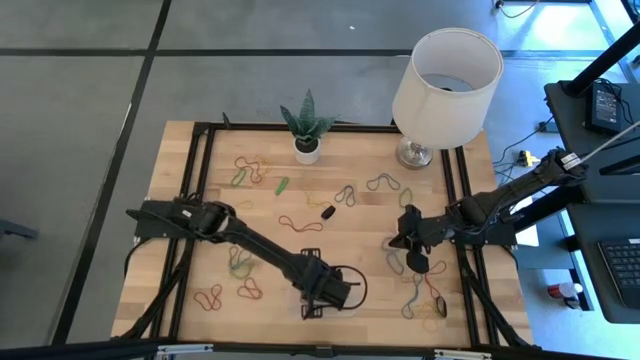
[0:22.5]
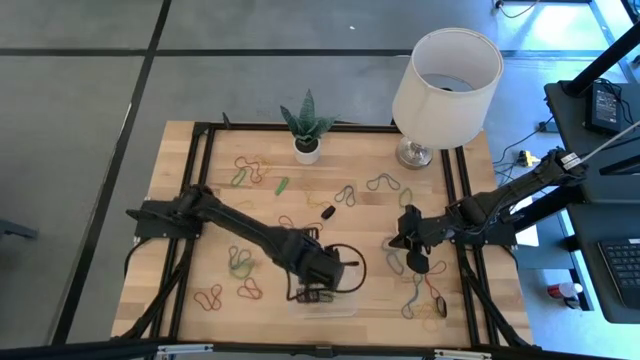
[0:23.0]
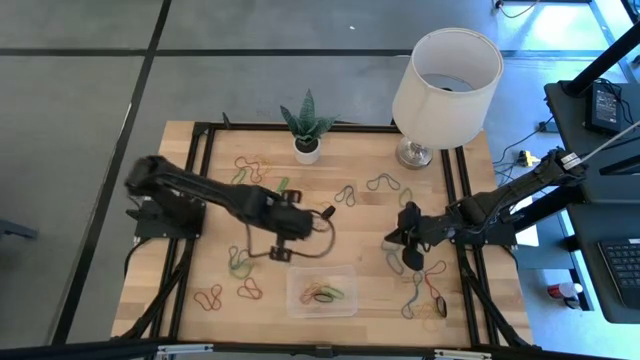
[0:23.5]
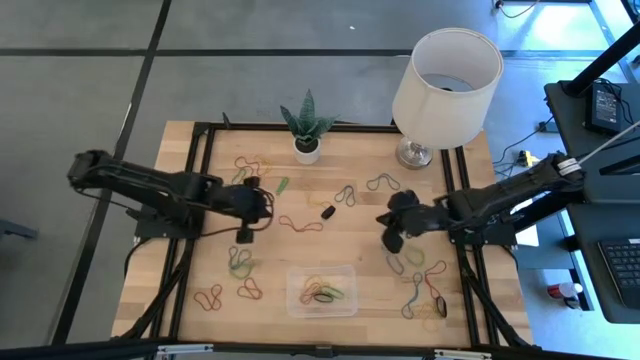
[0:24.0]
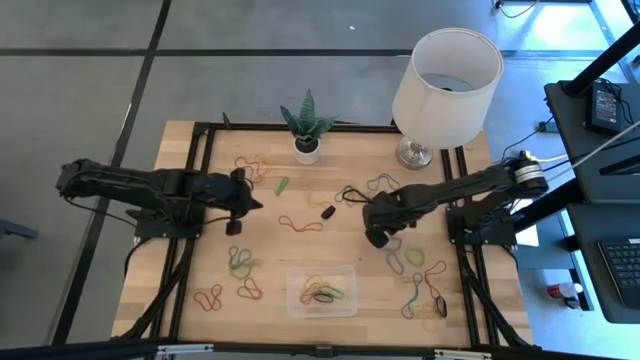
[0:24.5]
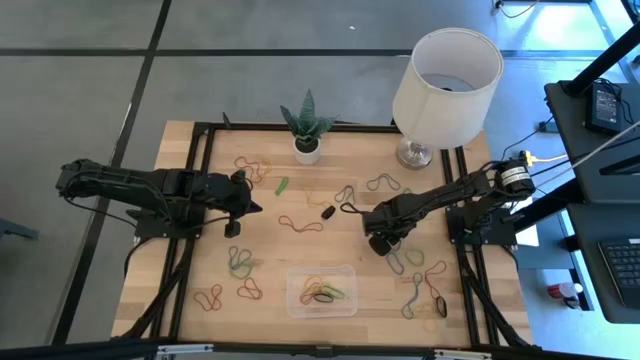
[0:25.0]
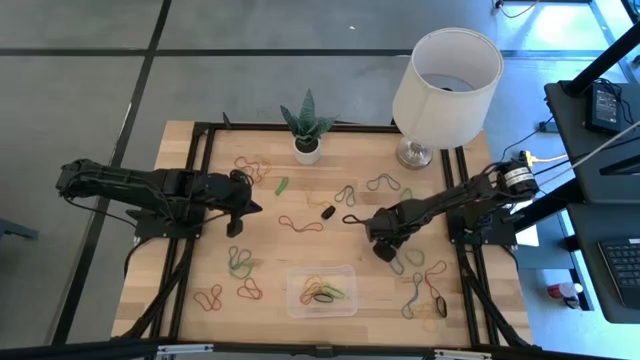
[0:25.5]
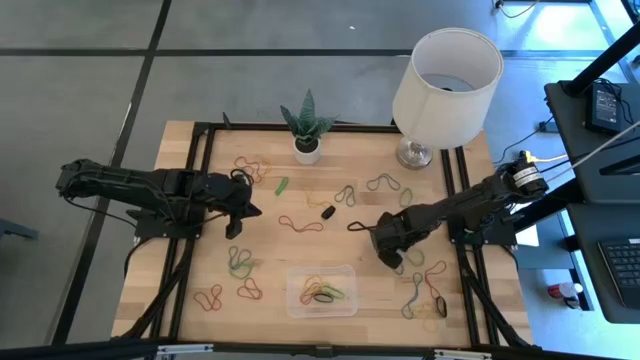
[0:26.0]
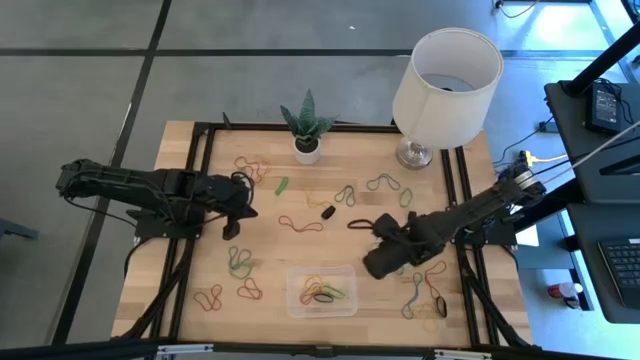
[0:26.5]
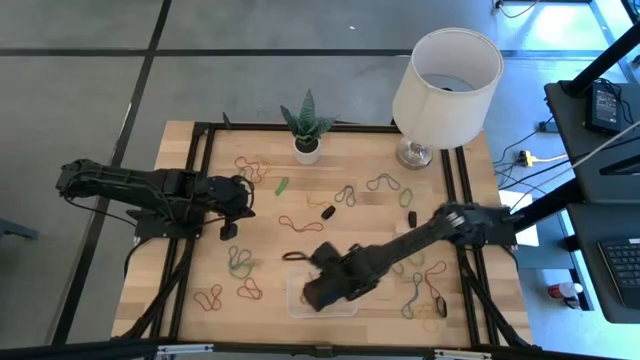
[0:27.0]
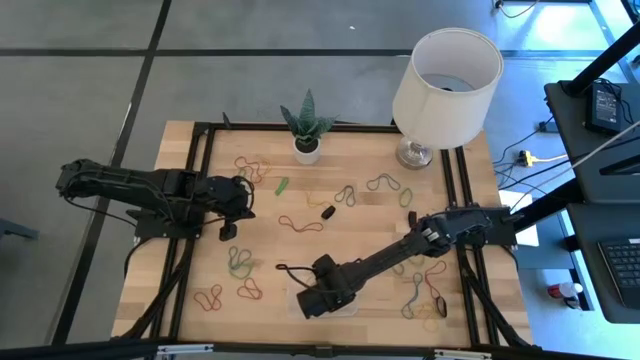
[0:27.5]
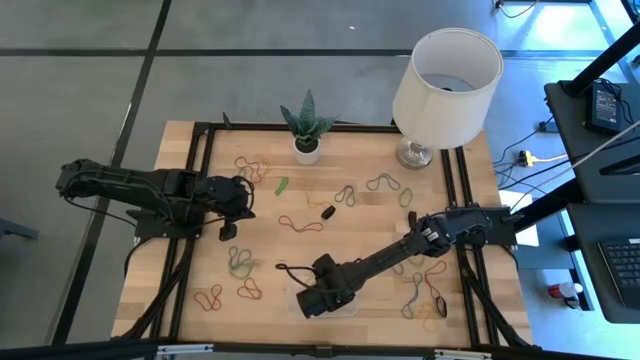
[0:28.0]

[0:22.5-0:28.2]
Task: Pick and place rubber bands into bin
Put the blue rubber band into the transparent bin

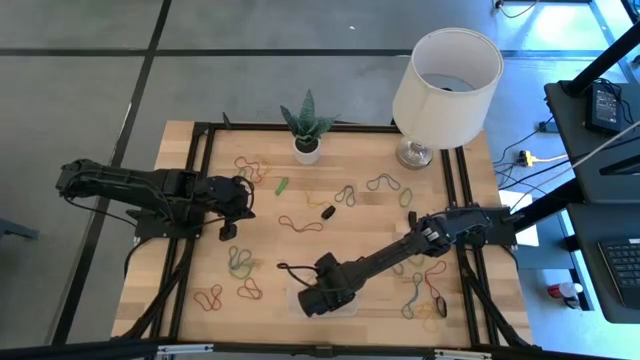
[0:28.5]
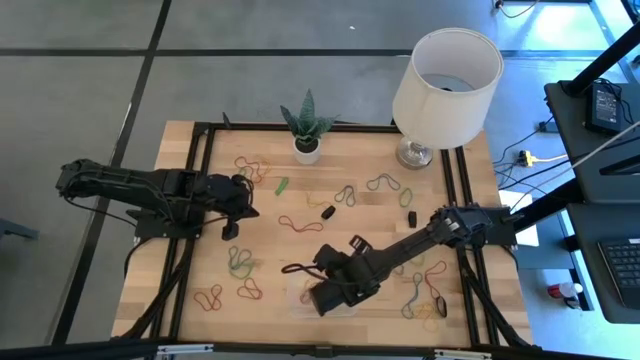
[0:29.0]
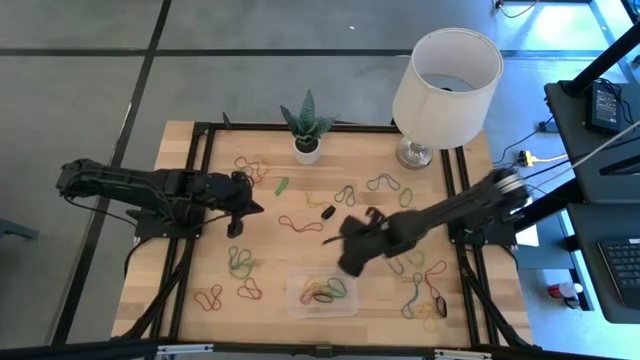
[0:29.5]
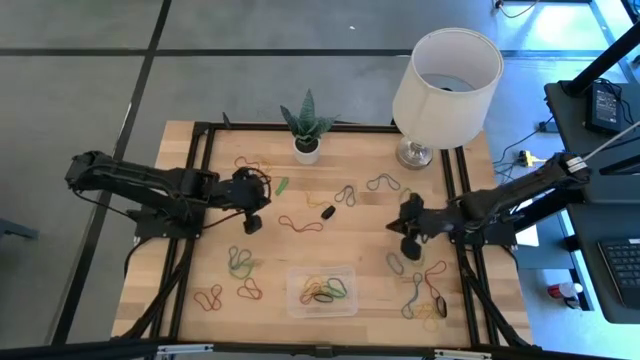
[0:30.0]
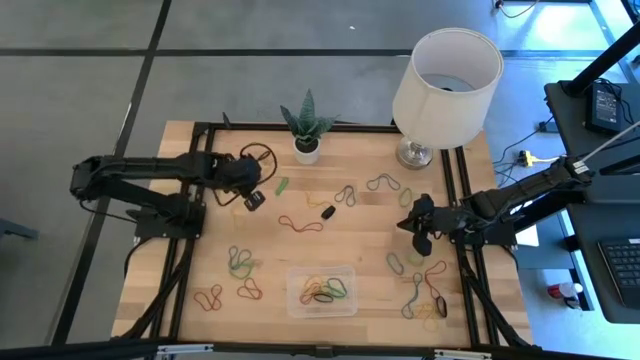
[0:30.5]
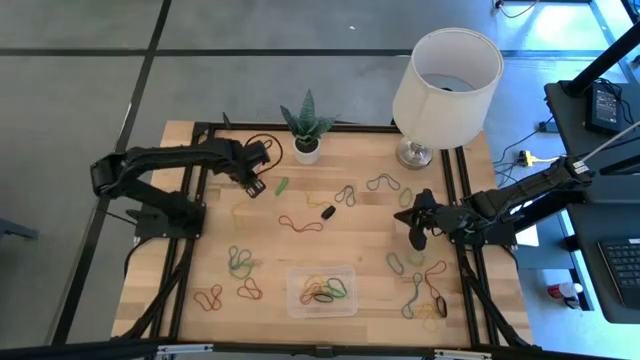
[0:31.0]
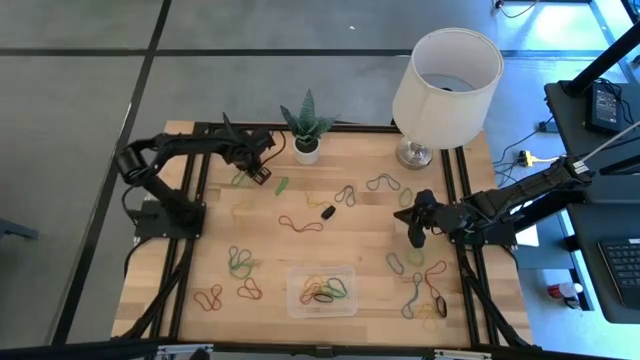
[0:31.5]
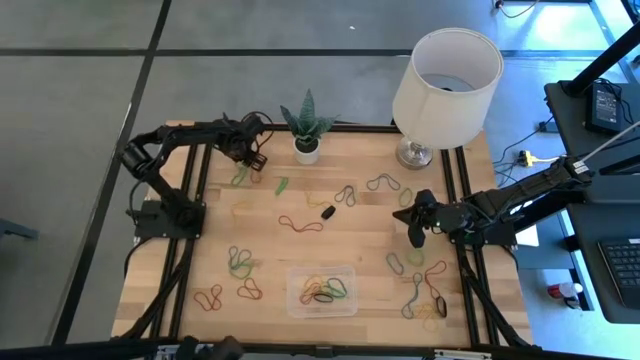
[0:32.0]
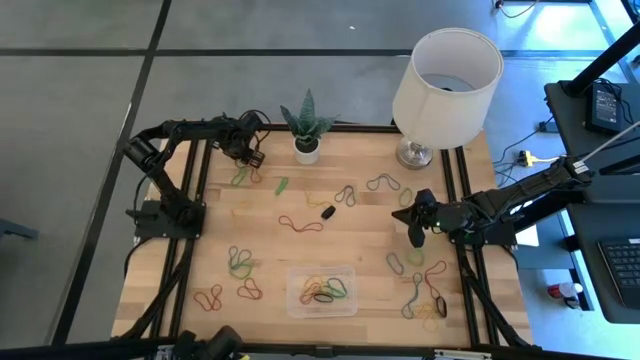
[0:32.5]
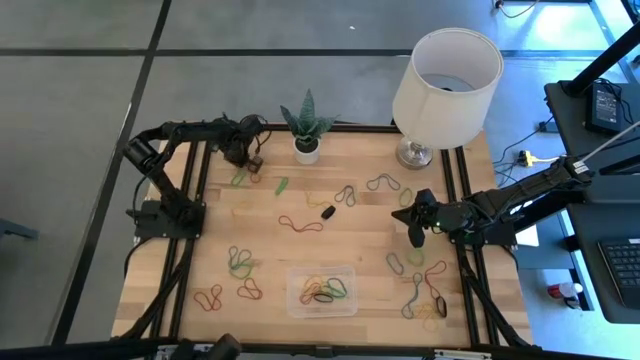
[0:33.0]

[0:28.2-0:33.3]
Put the red rubber band into the transparent bin

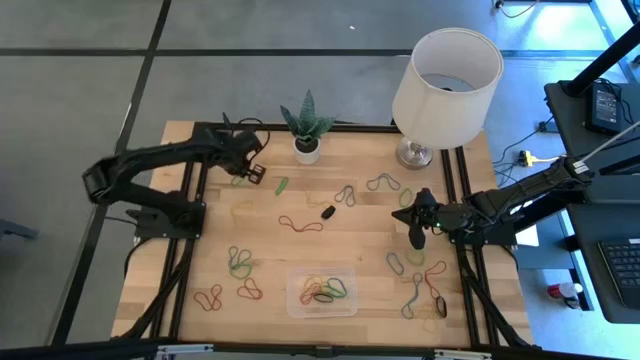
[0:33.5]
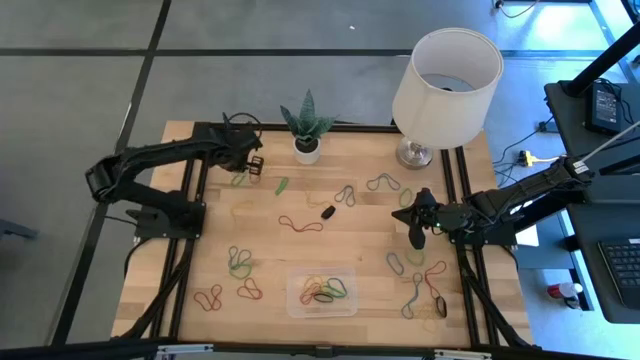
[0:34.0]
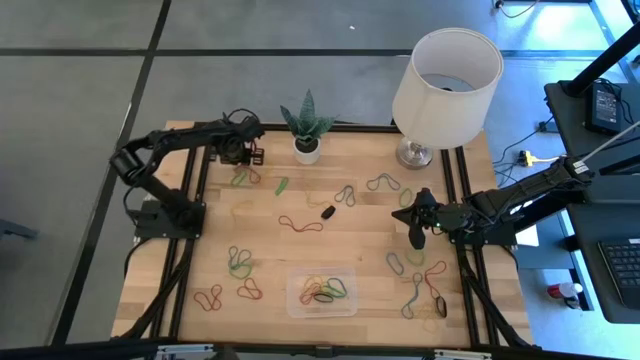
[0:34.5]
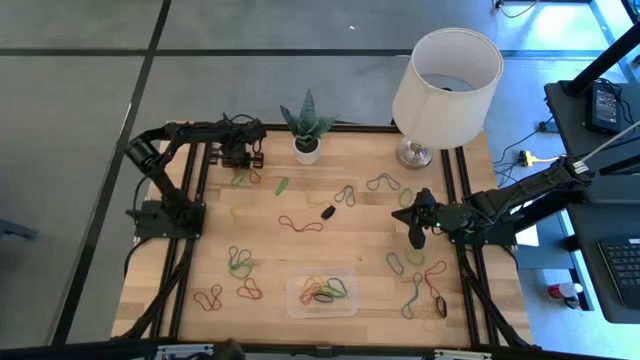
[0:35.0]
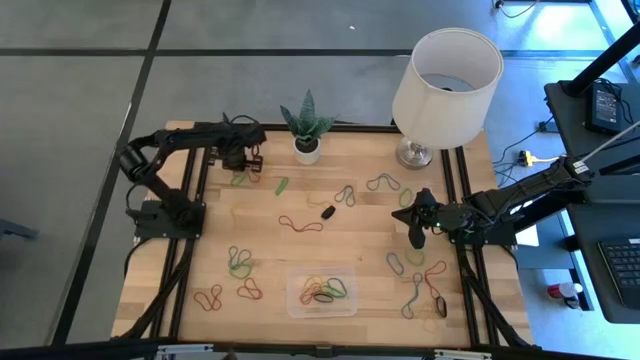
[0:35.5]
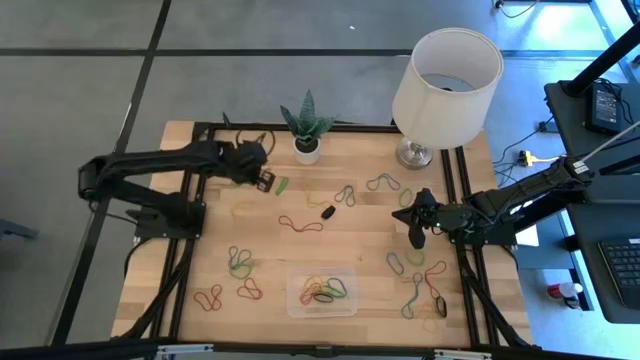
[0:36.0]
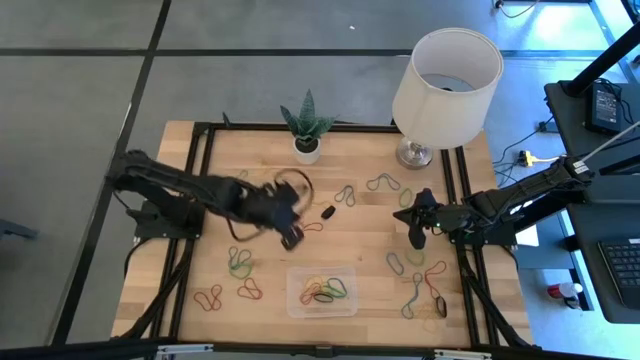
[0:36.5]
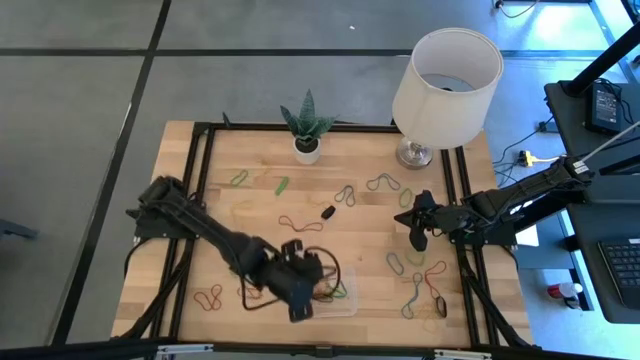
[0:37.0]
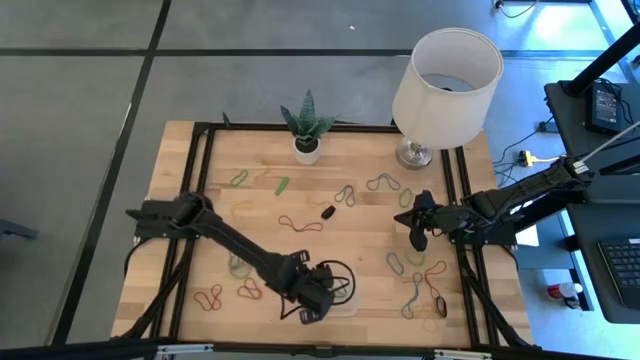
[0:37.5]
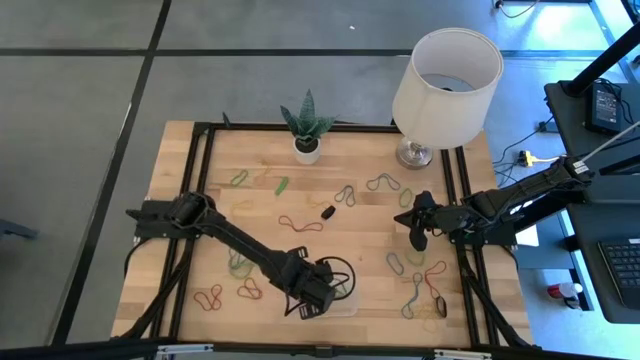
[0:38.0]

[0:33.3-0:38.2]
Put the red rubber band into the transparent bin

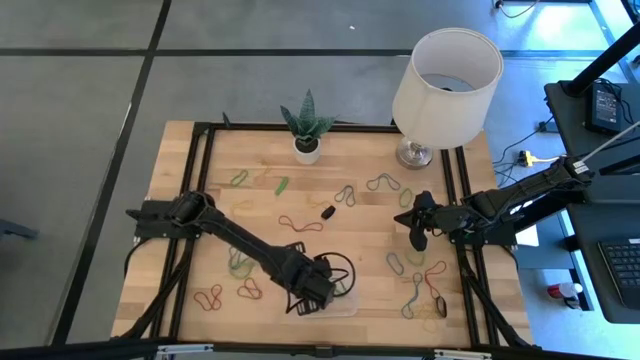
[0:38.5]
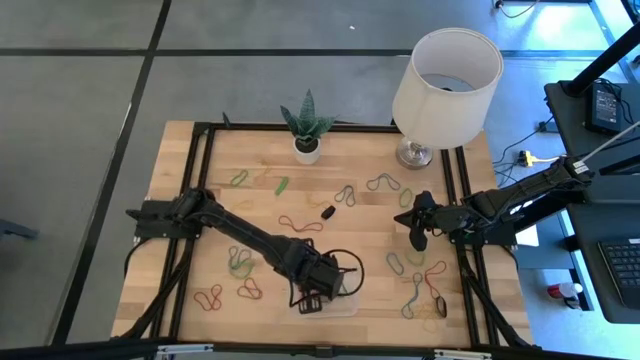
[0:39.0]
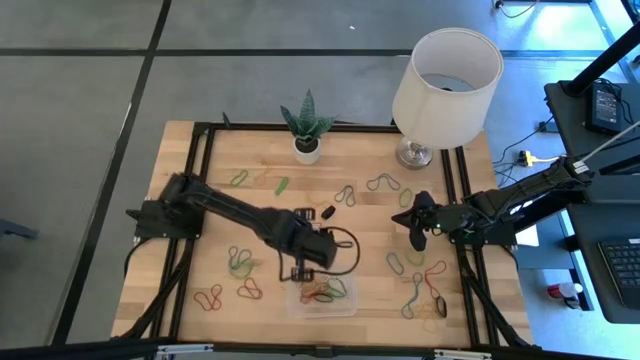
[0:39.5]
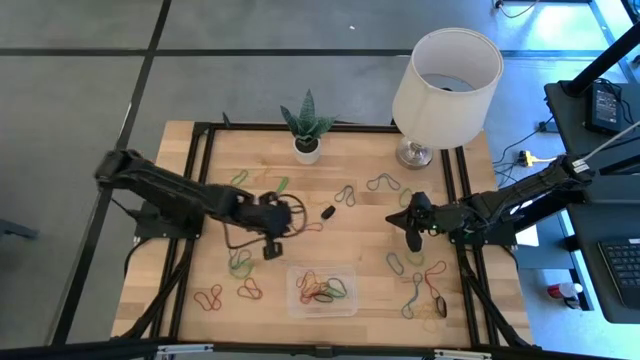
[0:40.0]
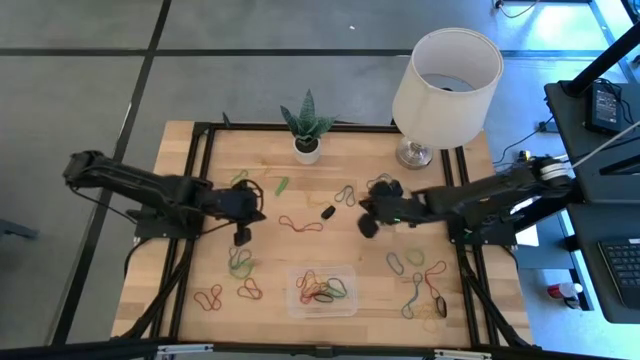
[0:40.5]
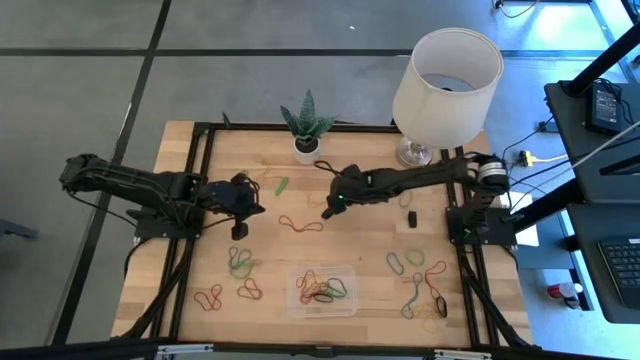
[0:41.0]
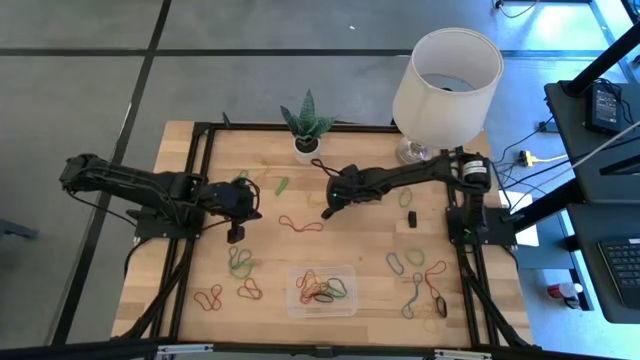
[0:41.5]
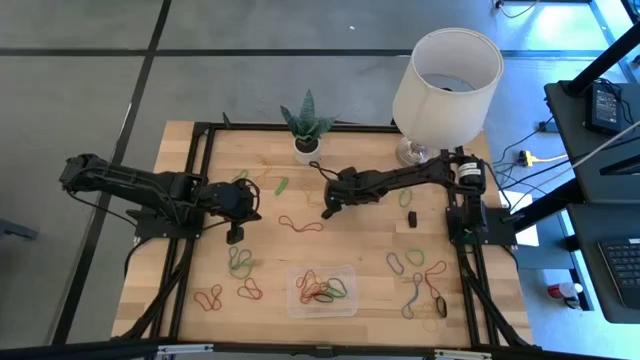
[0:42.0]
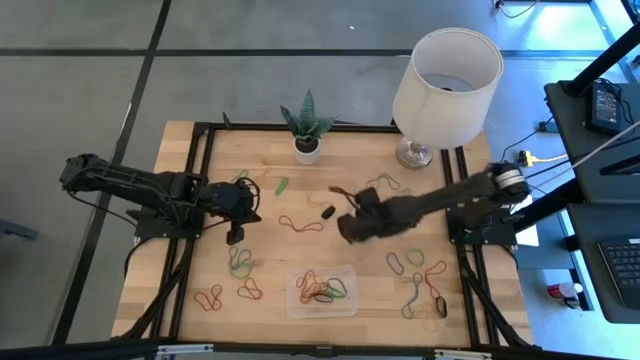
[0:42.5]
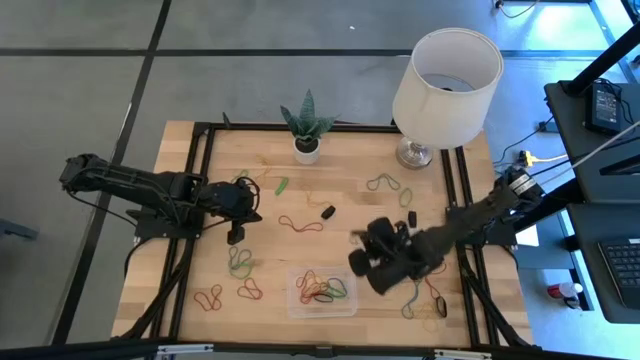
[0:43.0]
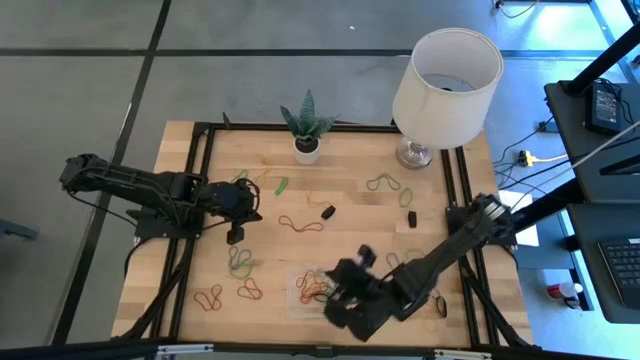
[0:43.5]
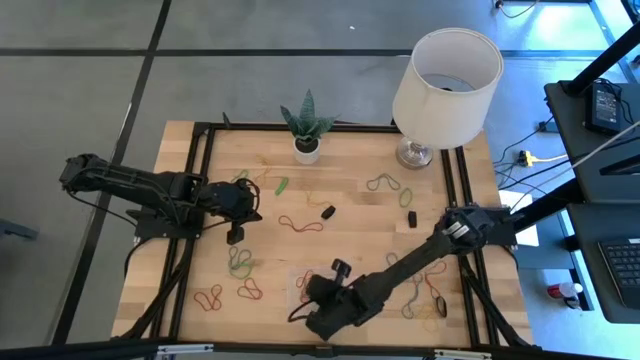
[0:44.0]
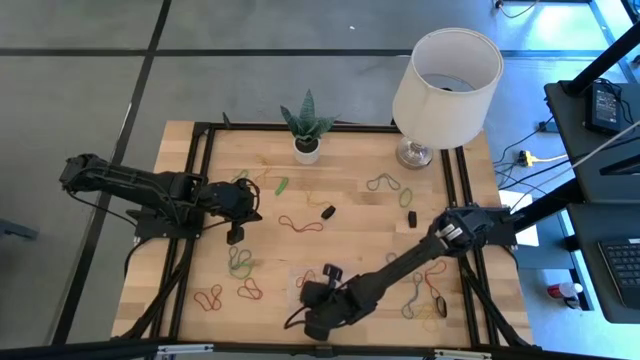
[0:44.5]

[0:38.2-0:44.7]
Put the blue rubber band into the transparent bin
